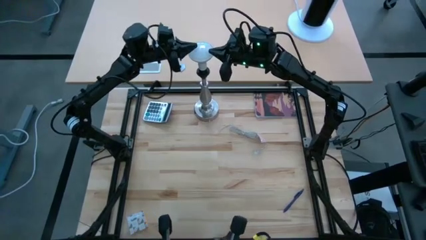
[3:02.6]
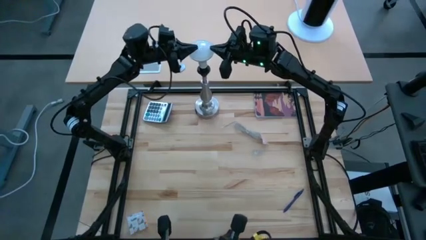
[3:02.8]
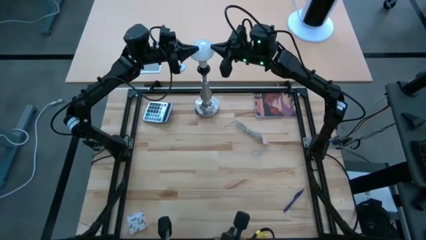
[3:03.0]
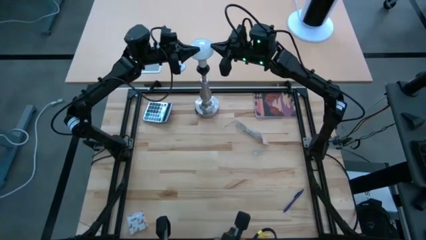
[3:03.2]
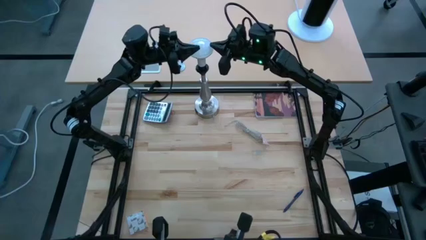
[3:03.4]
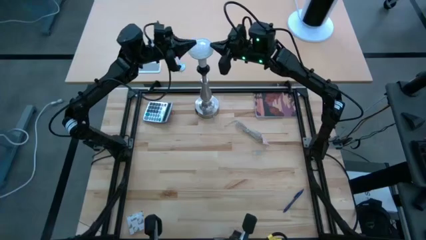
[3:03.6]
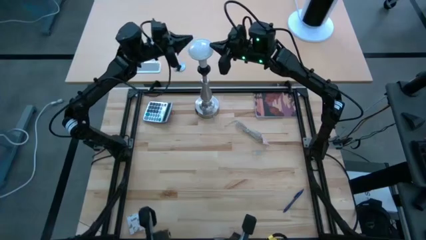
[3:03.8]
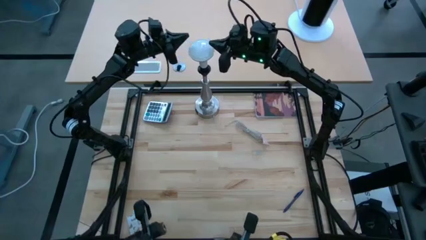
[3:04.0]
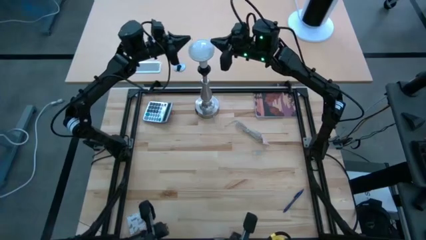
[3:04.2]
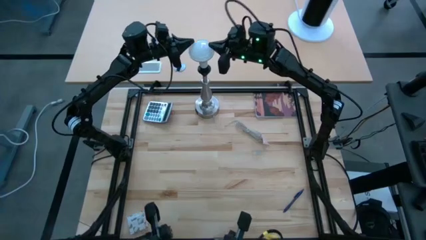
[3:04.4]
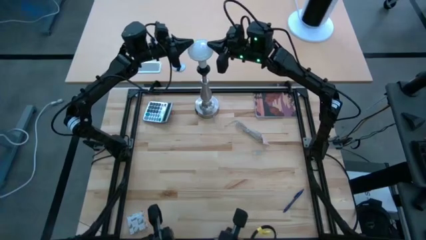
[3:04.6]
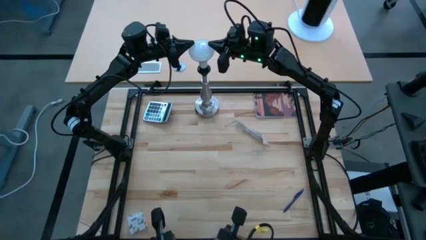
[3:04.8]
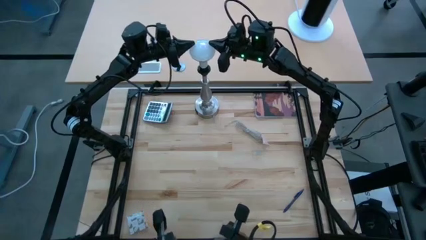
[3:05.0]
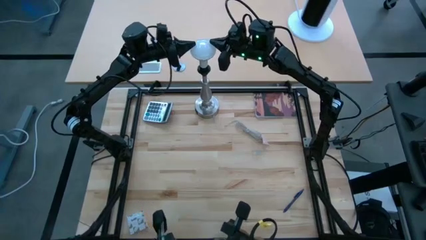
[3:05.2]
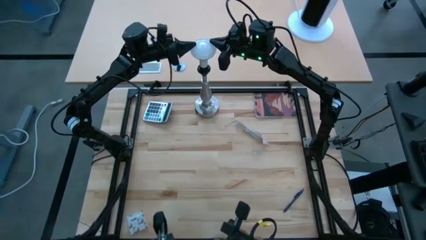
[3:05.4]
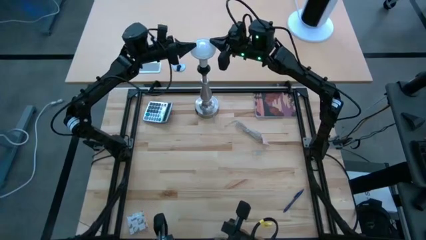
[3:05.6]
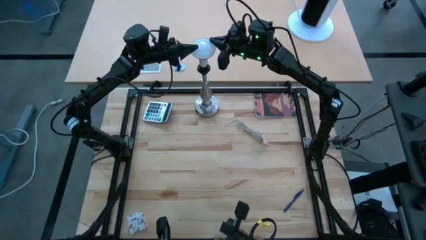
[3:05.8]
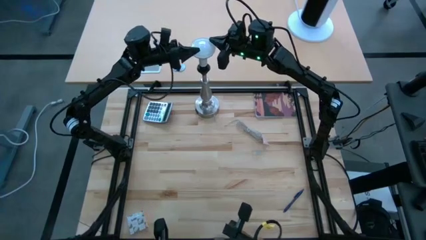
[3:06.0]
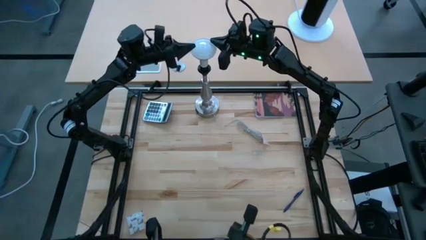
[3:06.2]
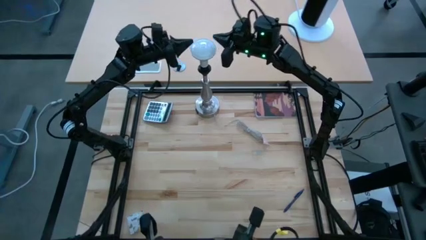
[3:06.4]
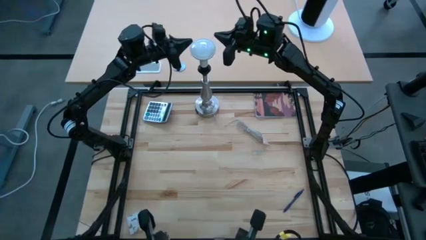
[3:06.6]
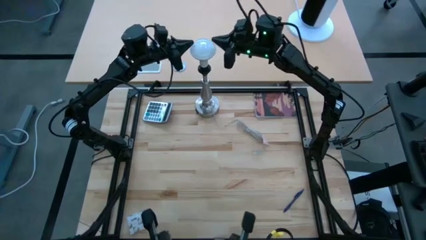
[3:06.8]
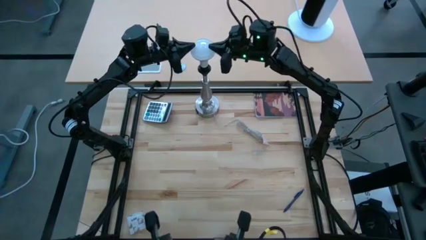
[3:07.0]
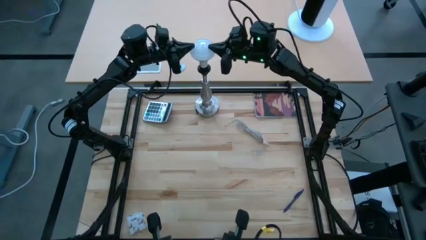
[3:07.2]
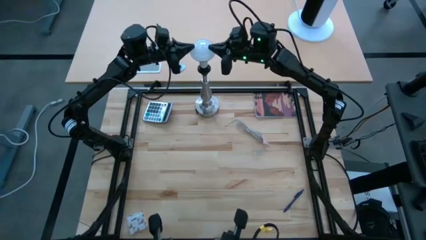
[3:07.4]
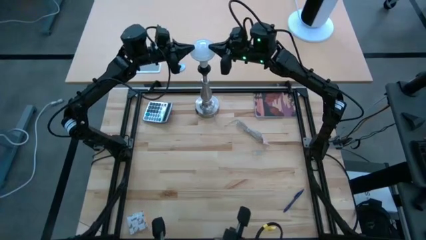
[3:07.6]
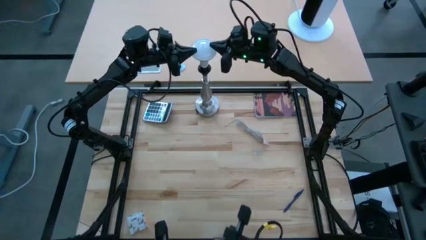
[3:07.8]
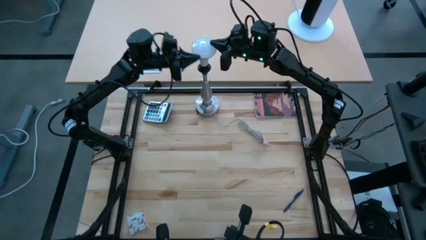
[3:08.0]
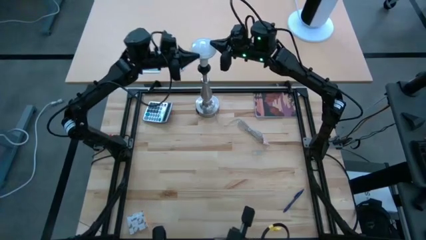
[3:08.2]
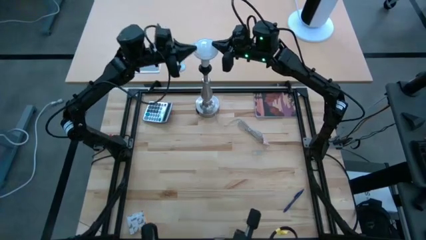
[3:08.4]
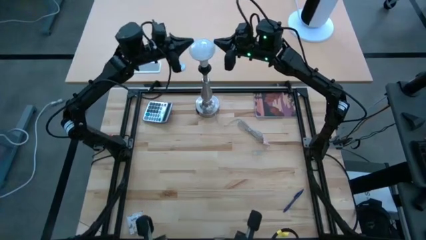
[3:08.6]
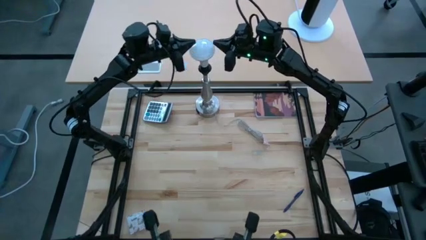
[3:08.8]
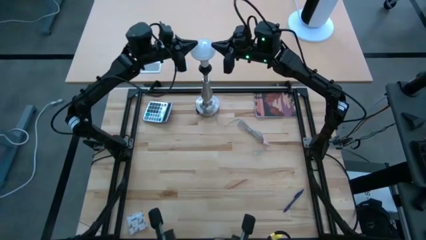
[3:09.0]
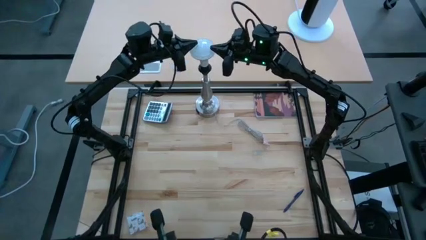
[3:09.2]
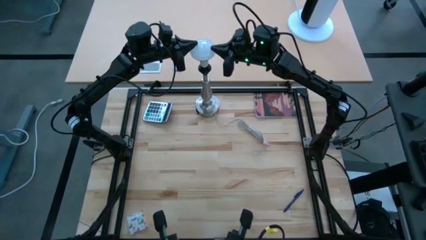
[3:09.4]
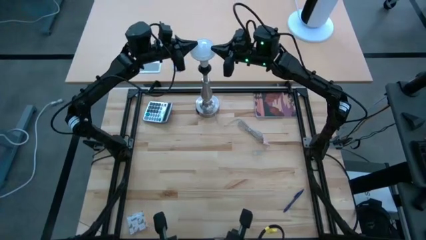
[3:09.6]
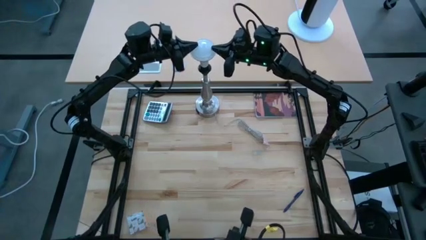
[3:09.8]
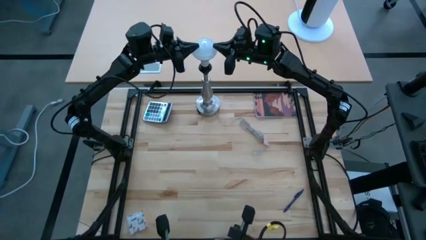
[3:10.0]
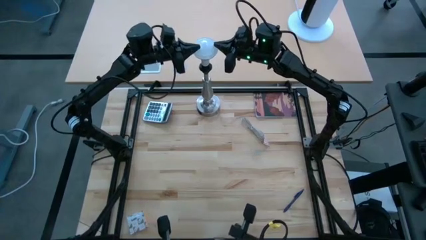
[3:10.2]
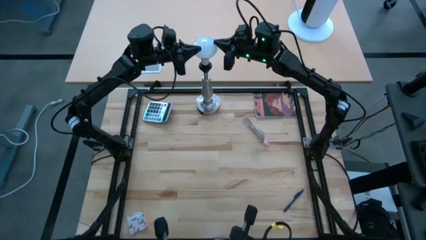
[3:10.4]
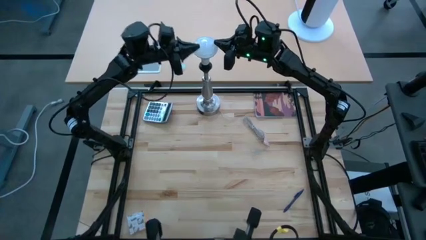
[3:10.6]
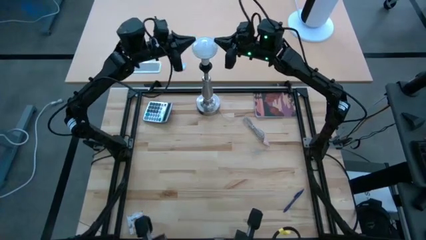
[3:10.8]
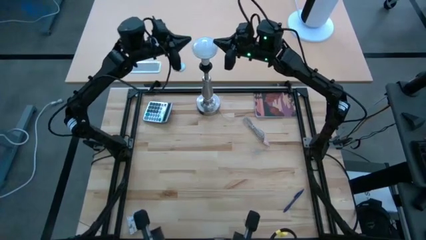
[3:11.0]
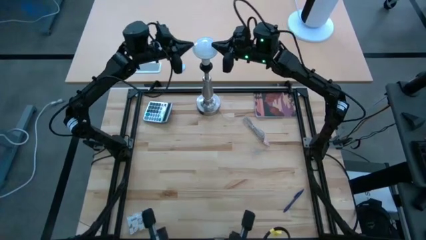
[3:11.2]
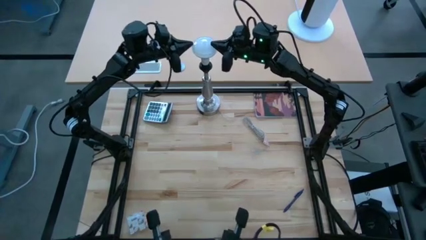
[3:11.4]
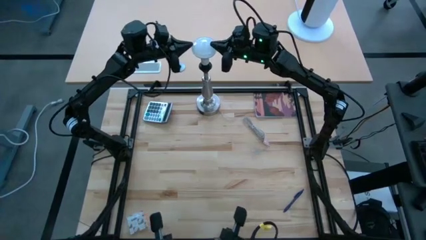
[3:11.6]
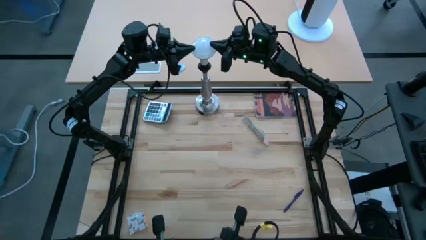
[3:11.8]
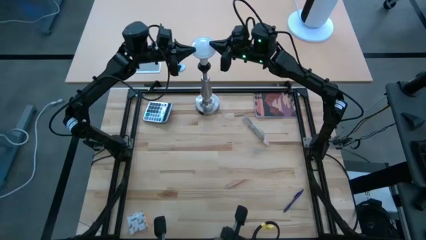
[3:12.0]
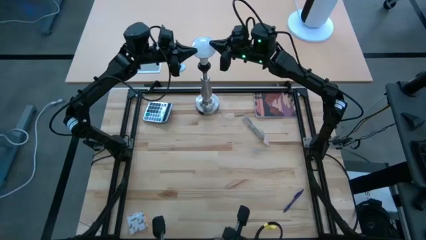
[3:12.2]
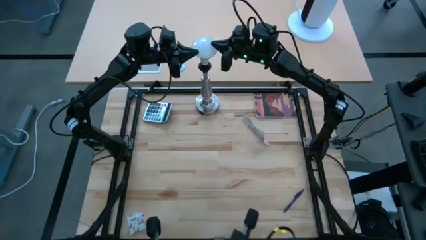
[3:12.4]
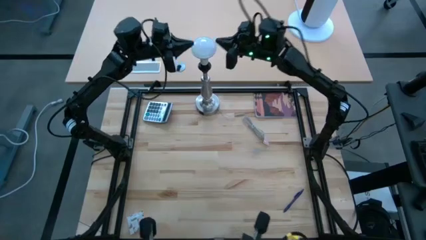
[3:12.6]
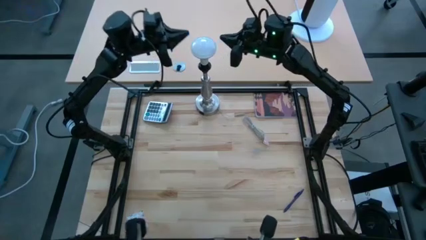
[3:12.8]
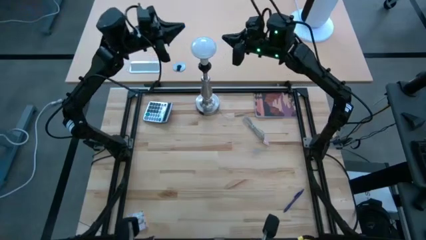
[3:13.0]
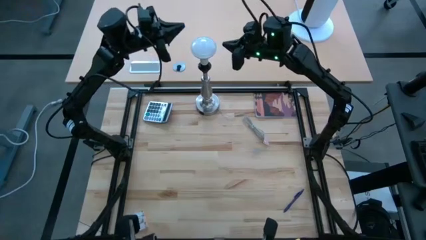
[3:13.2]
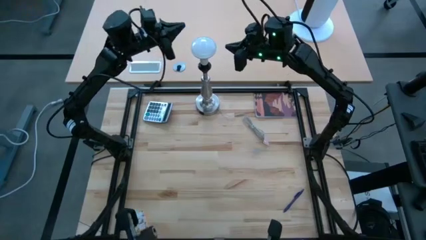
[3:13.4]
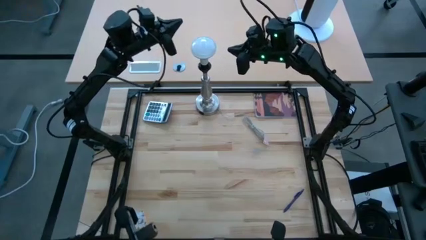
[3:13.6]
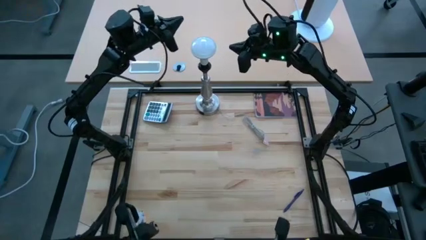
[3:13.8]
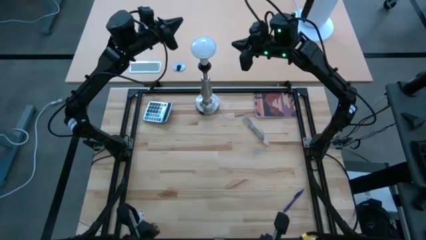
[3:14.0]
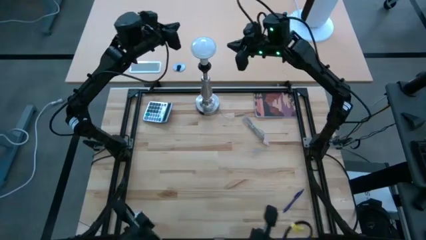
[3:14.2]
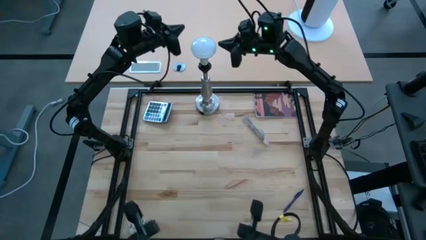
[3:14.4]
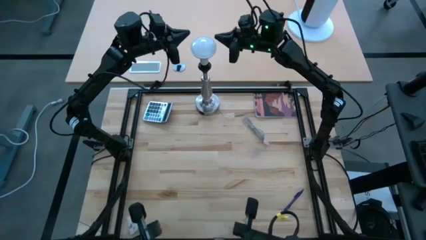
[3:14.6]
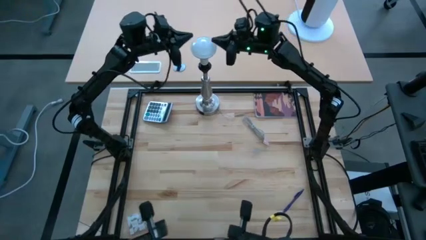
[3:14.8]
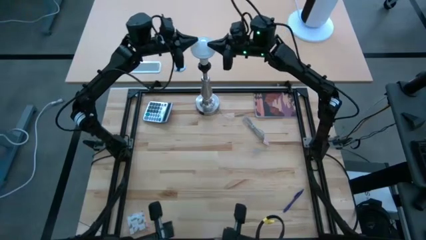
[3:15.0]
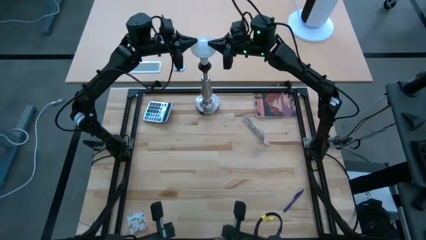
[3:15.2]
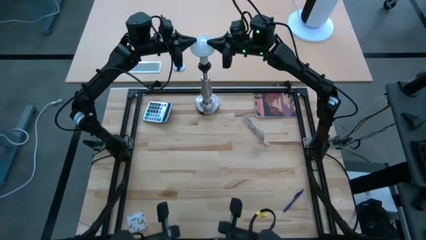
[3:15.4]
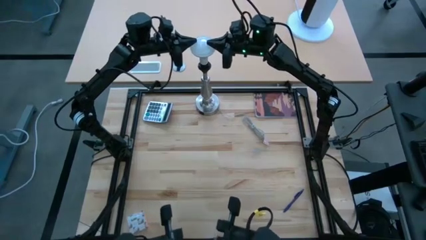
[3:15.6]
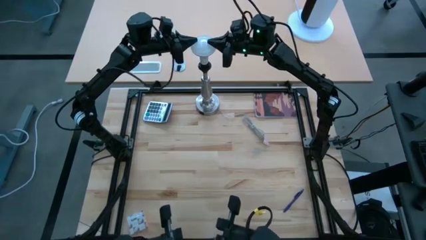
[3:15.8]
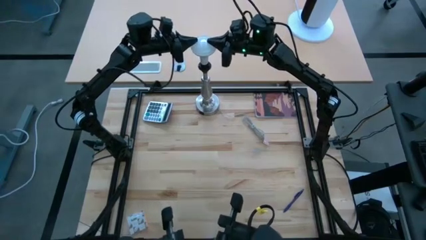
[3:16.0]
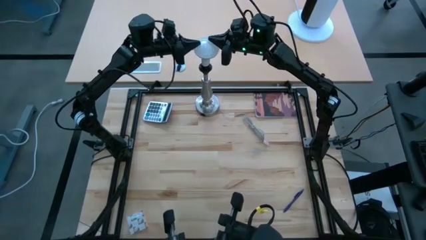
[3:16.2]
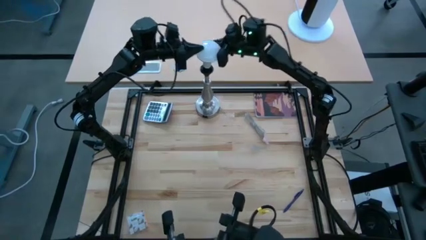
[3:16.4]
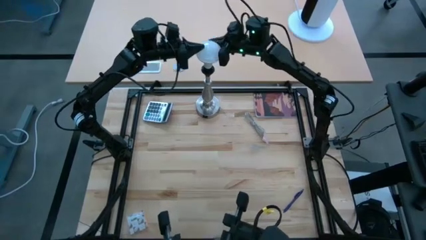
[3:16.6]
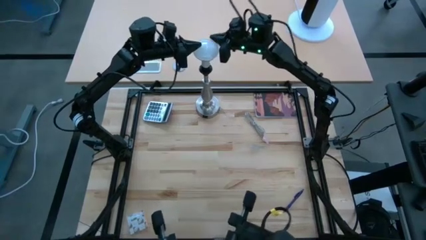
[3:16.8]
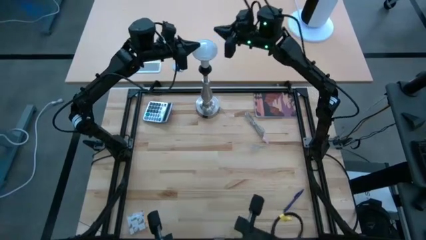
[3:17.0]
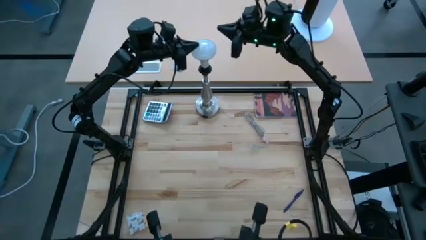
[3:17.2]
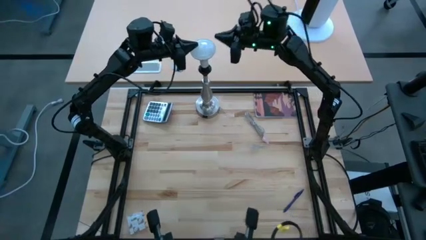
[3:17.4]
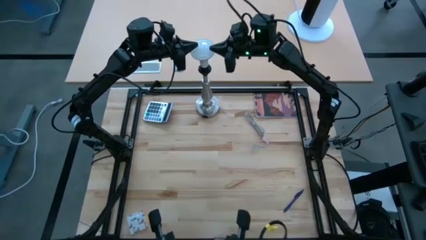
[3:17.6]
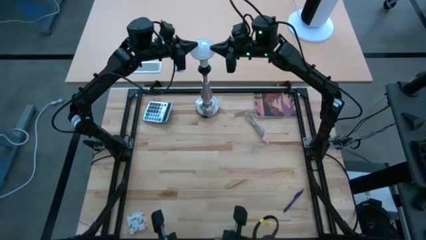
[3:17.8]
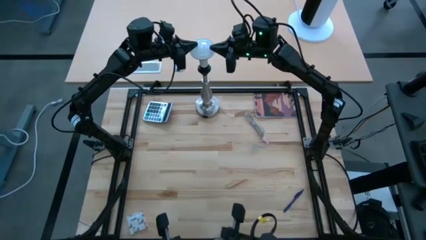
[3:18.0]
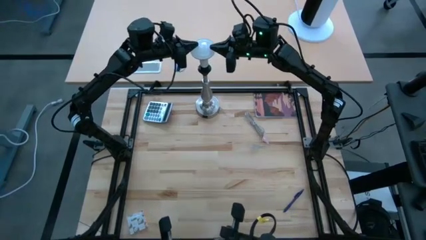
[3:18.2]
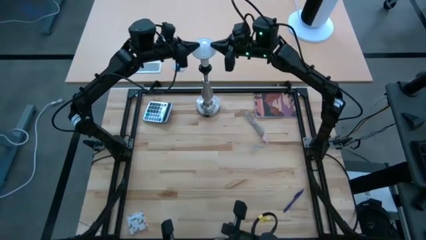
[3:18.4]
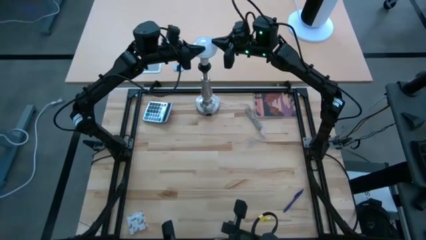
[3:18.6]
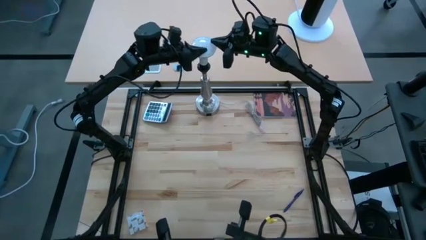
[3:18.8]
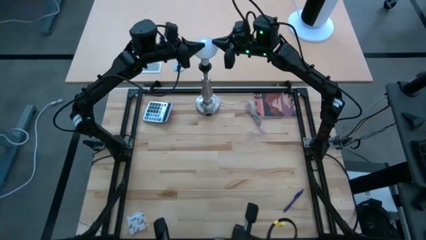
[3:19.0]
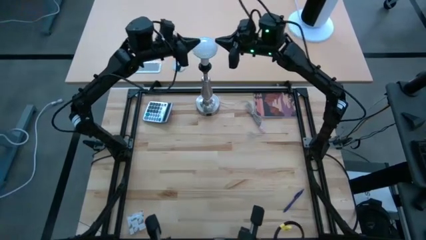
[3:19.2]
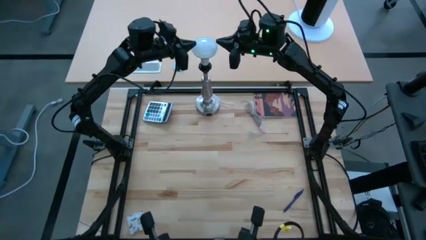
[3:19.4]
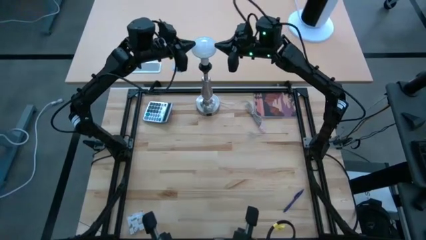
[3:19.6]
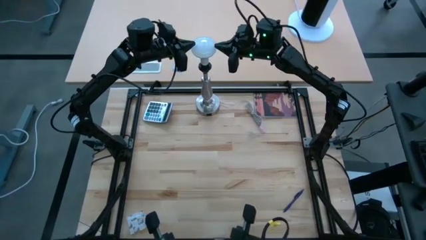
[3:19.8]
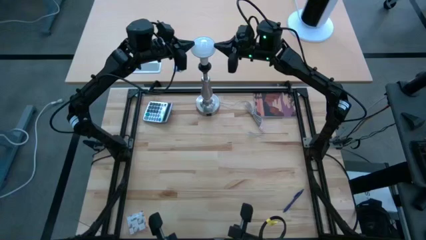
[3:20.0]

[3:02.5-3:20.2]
Task: Screw lightbulb
Remove the lightbulb from the table lamp
